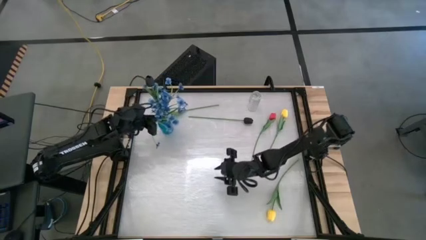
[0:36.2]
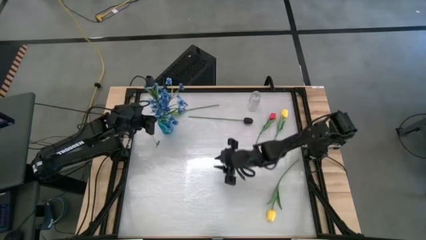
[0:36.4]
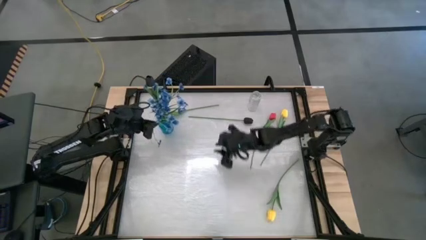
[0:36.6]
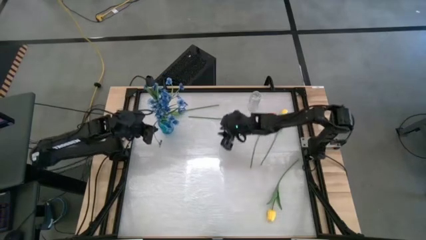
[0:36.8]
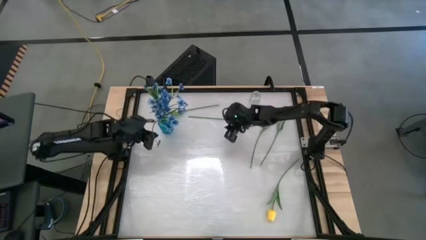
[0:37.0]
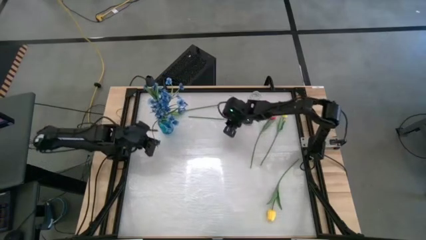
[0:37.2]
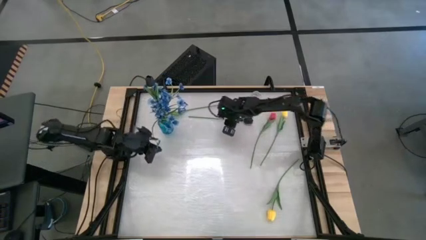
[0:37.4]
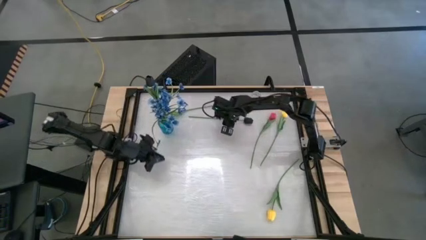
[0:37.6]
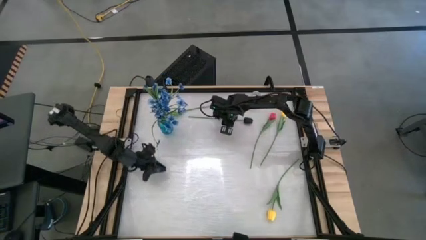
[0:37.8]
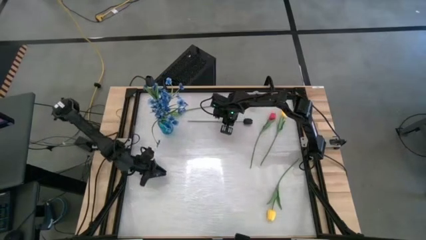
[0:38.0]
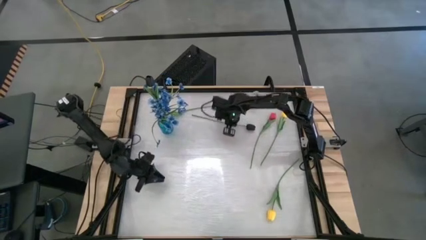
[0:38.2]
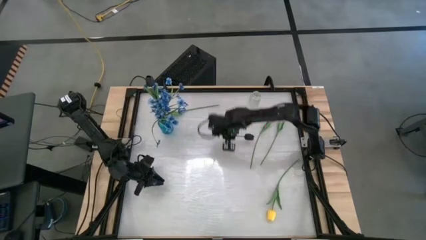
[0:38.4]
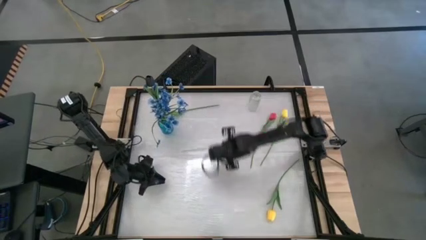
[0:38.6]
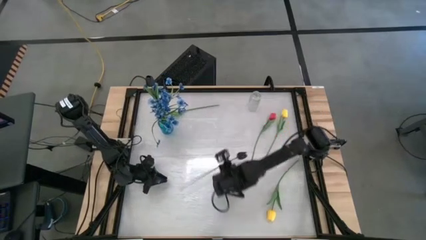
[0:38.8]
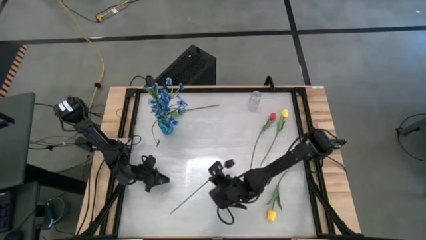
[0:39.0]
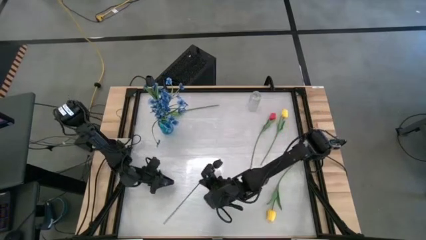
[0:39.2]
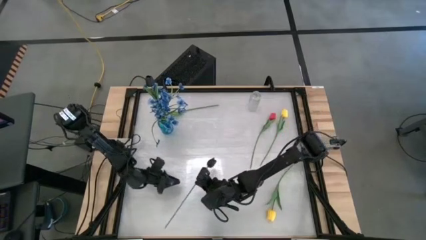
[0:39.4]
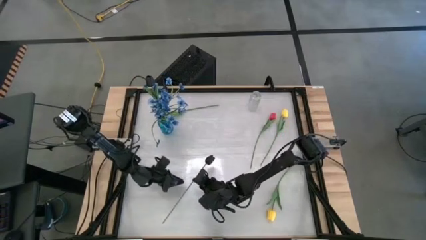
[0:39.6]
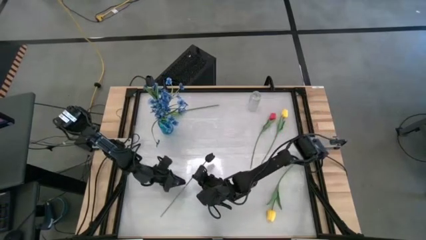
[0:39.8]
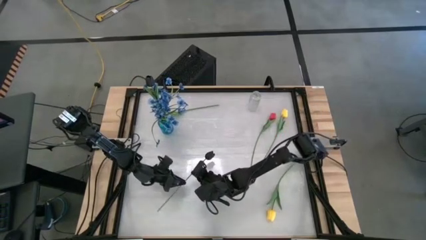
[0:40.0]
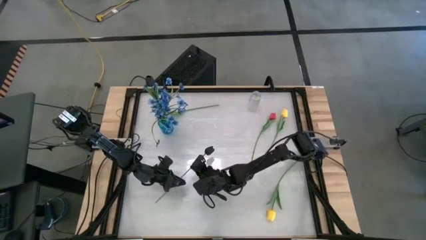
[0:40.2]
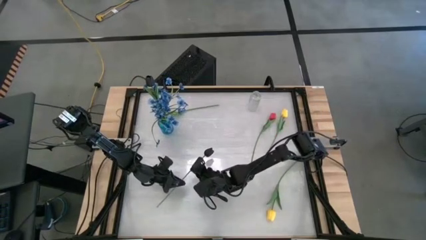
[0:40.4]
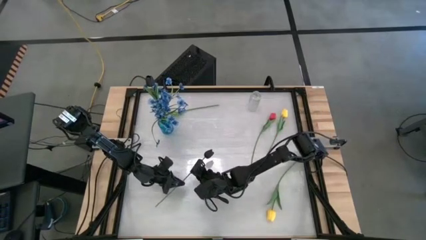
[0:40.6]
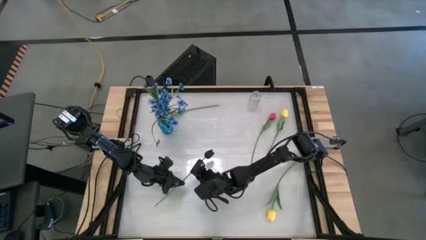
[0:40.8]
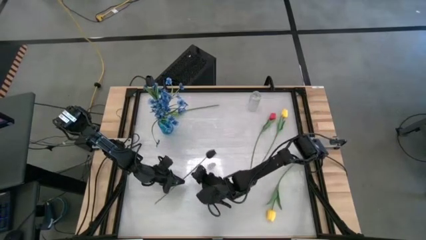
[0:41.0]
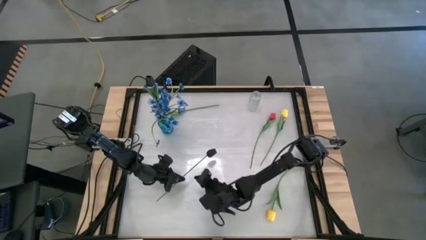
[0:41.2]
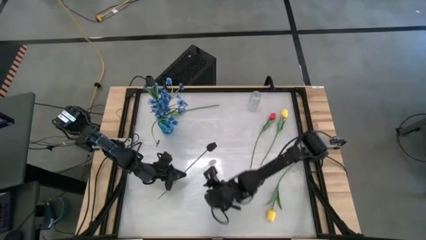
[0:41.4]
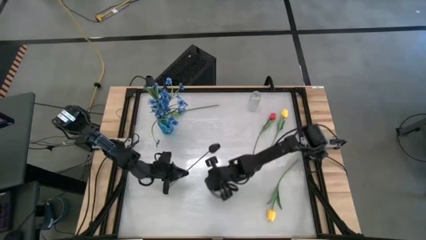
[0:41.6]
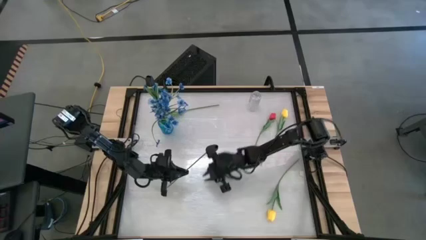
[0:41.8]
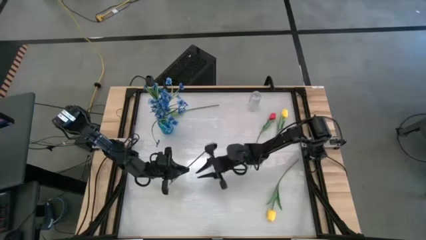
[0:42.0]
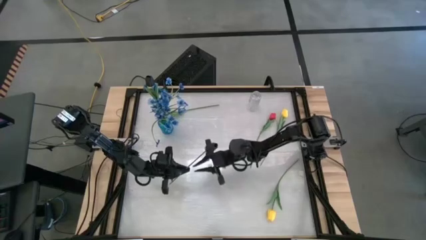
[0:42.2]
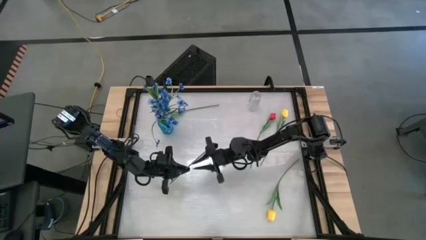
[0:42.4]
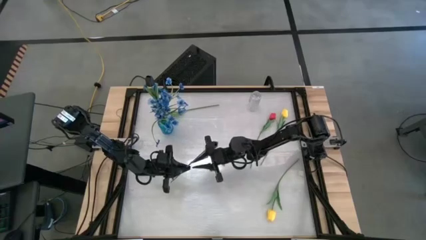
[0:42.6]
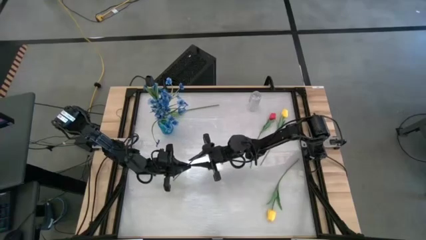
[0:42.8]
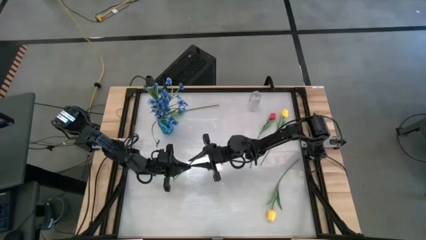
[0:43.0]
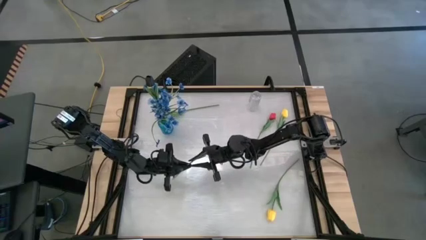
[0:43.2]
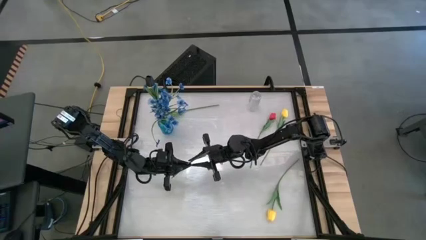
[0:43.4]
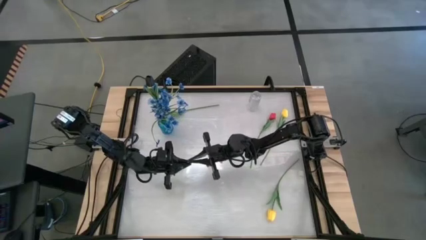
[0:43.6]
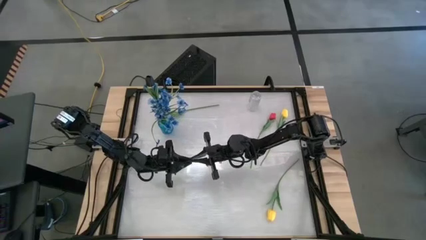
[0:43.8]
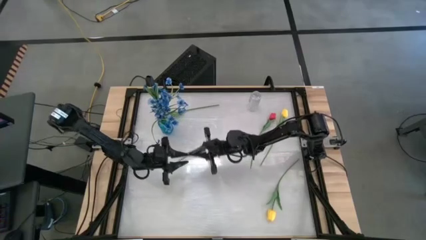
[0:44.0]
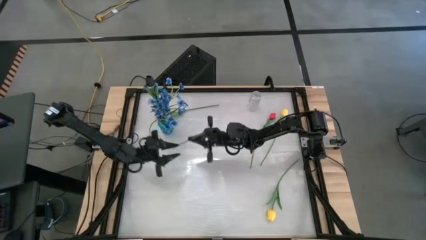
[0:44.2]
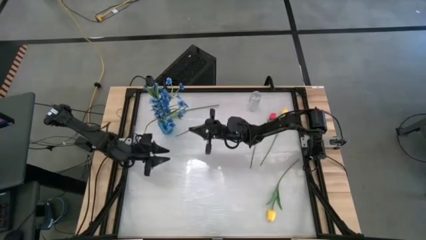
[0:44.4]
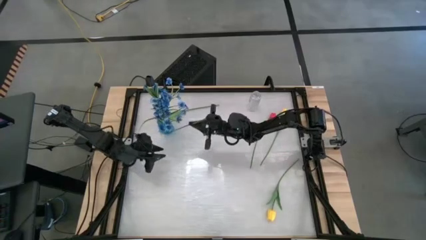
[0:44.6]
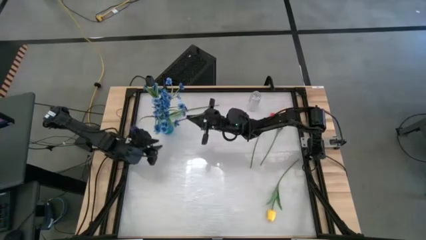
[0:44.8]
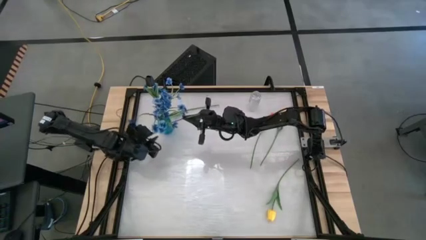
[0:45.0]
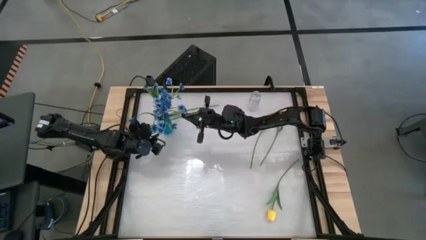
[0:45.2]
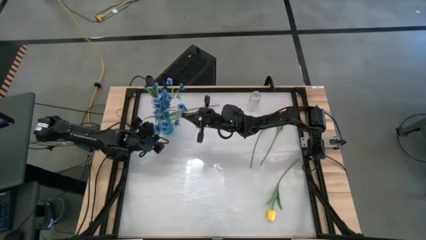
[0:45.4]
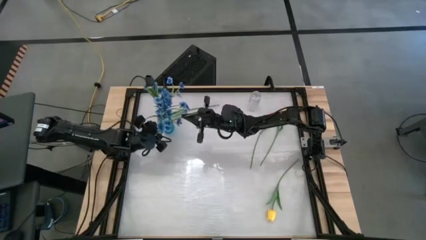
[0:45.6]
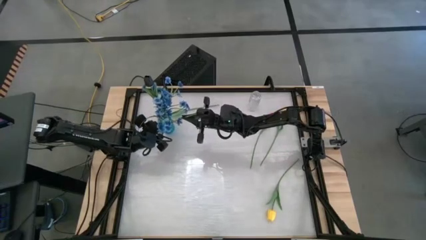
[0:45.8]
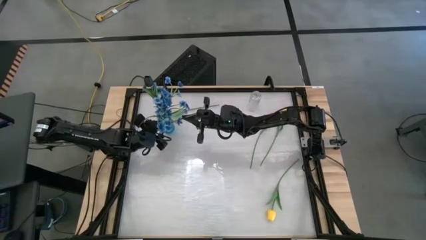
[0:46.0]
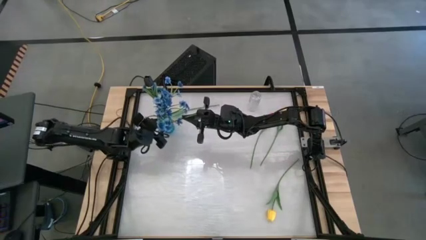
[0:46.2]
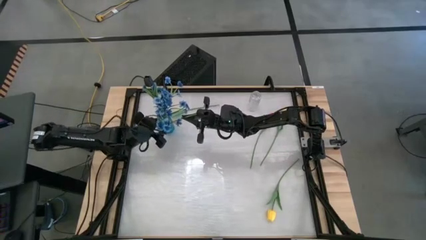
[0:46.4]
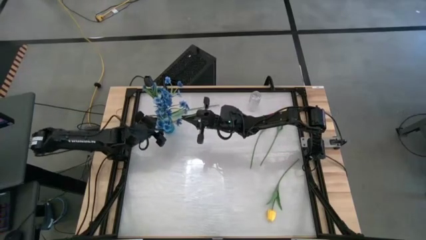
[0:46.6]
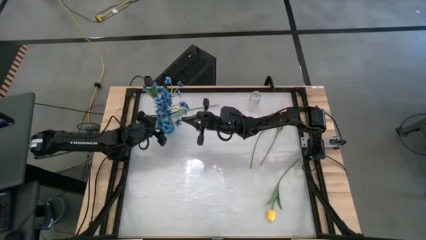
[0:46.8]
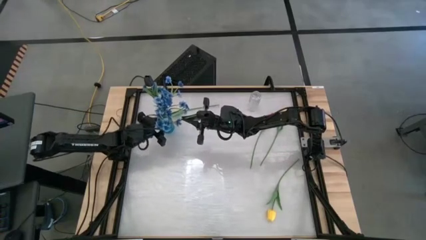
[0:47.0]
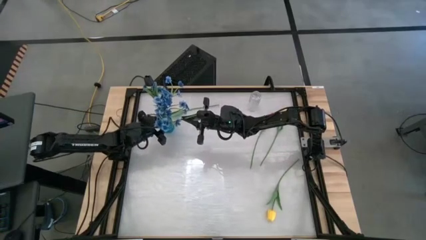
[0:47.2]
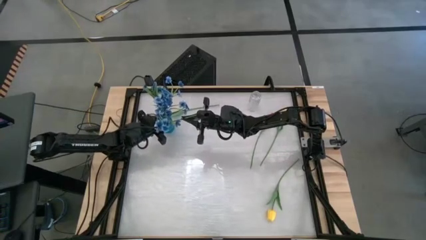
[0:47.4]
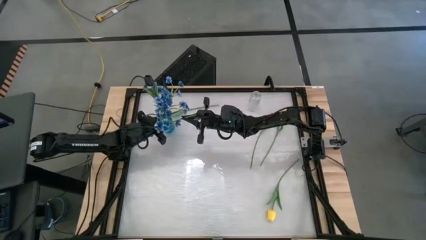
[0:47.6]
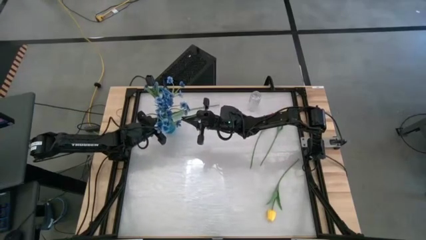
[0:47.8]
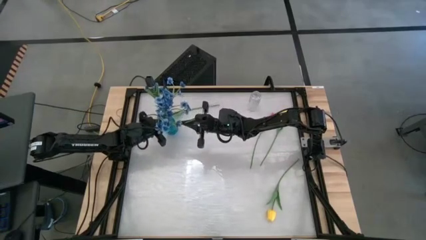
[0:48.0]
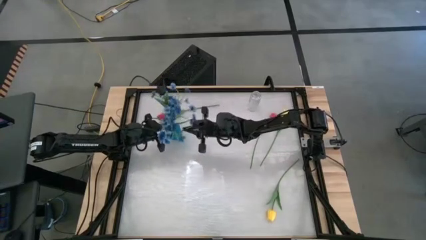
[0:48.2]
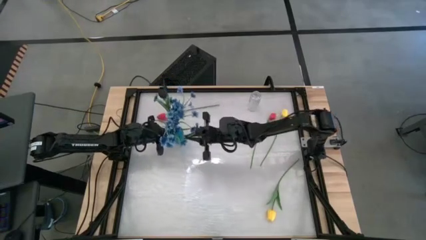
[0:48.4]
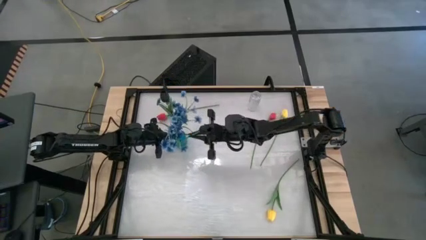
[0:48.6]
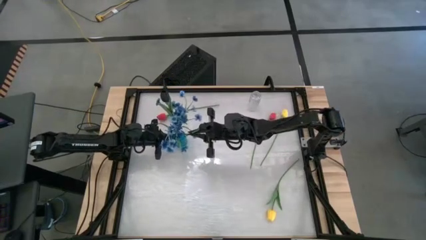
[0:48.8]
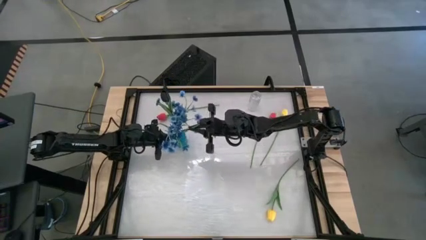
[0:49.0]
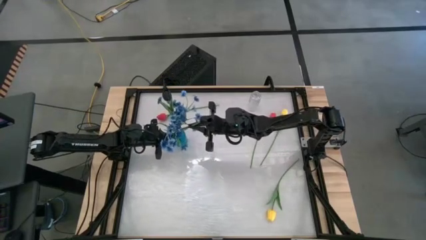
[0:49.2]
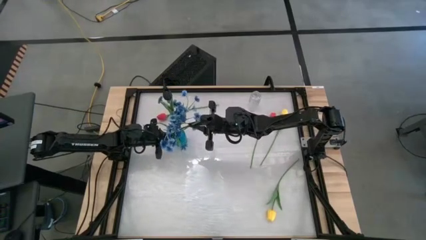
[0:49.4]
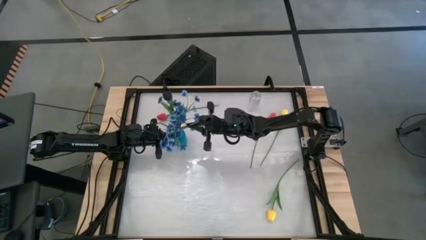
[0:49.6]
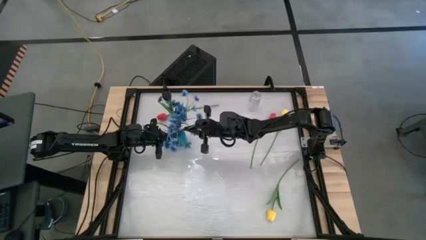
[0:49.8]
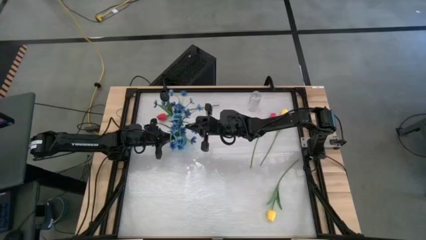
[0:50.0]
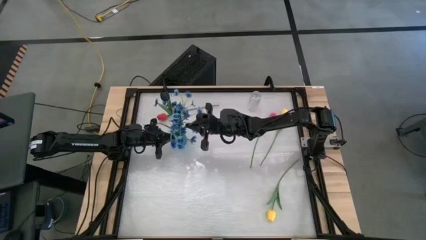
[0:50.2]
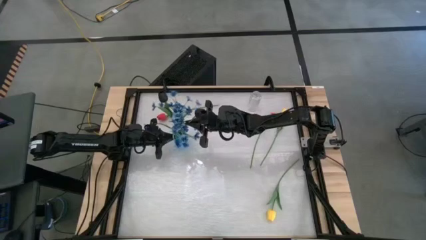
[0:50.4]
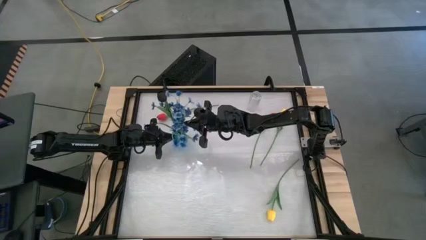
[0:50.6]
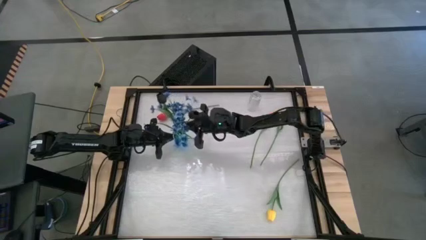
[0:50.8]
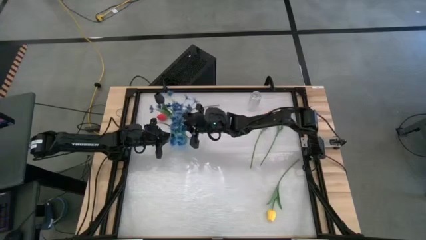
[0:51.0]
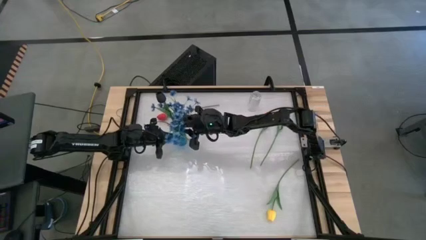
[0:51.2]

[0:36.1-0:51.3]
Task: Sort flowers into vase by color
Put the black tulip flower into the blue vase

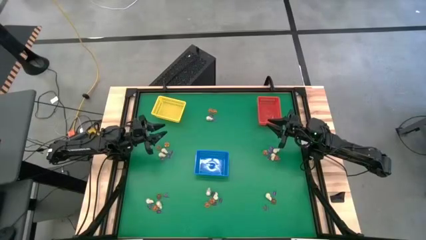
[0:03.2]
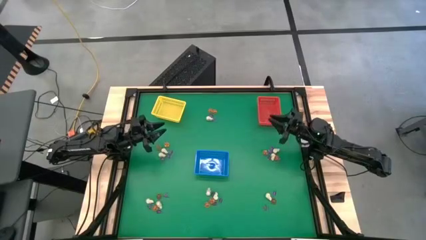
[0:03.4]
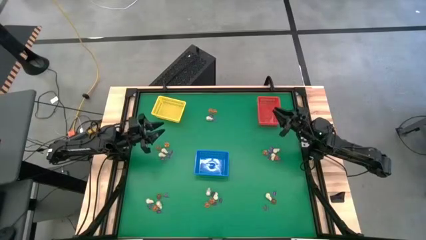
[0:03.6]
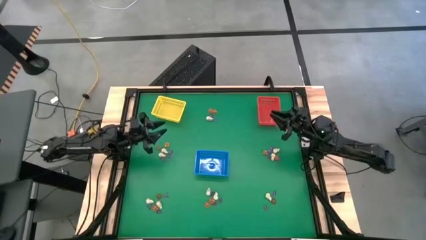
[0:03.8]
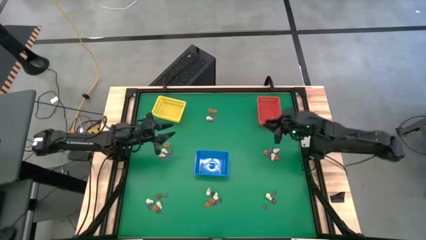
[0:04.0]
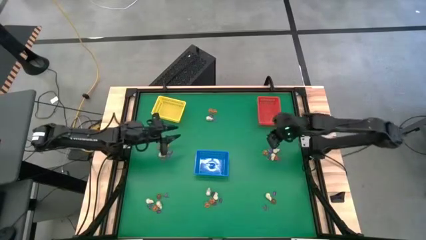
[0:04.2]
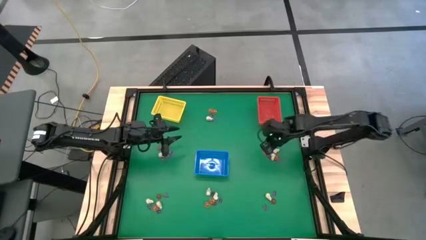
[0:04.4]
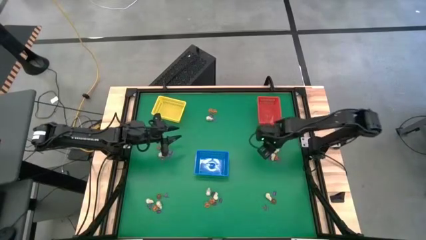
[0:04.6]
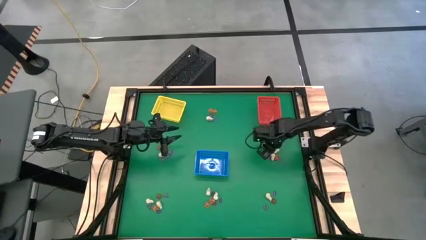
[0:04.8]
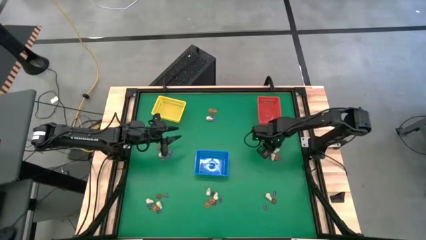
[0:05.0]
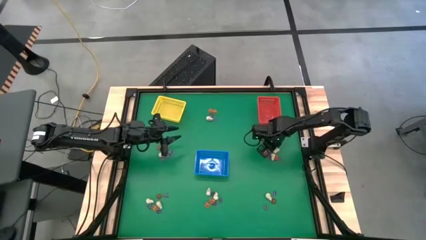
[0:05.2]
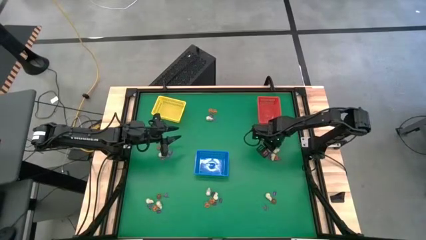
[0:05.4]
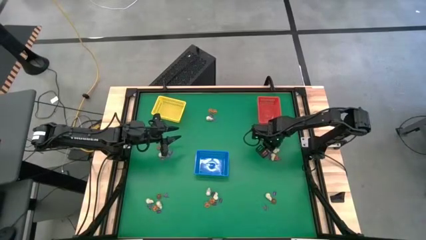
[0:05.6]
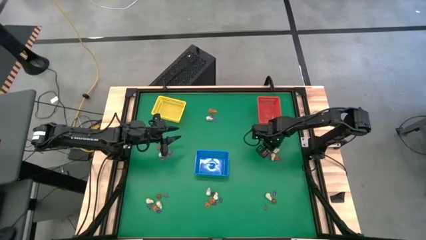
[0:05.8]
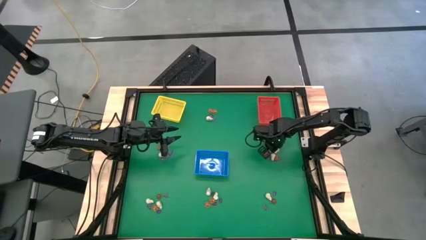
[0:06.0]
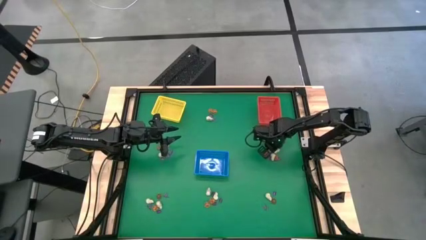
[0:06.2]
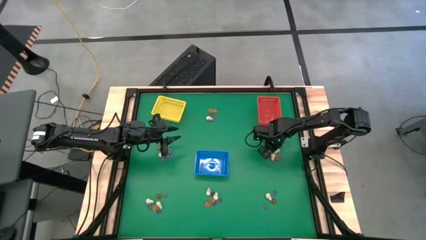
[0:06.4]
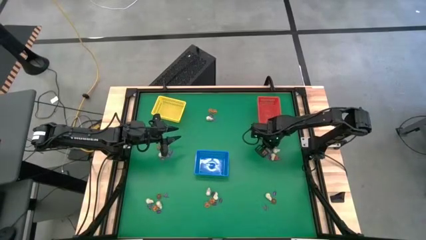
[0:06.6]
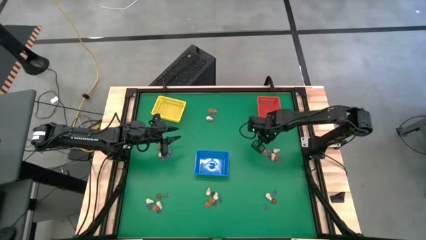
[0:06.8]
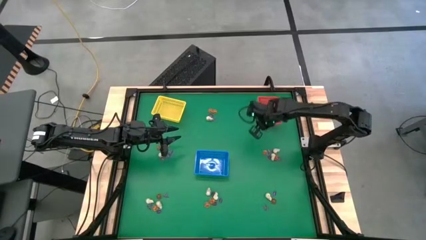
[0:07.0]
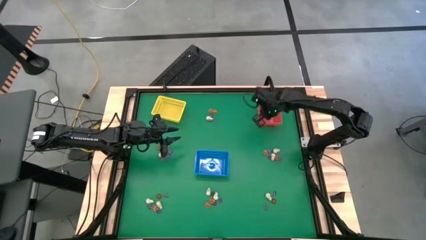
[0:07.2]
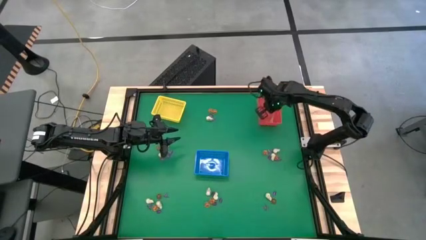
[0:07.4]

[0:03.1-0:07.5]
Task: Sort Halloween decoration
Put the purple witch hat toy into the red bin
